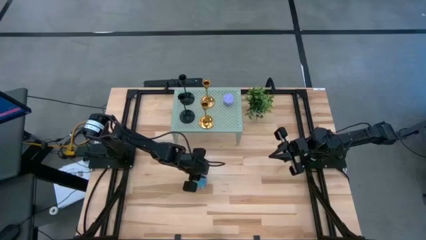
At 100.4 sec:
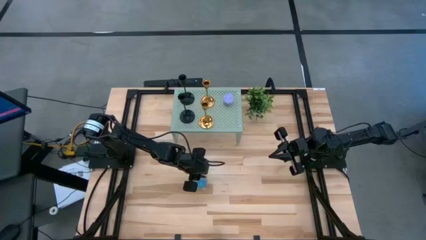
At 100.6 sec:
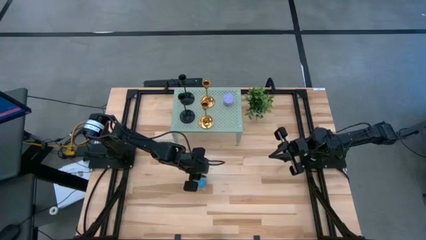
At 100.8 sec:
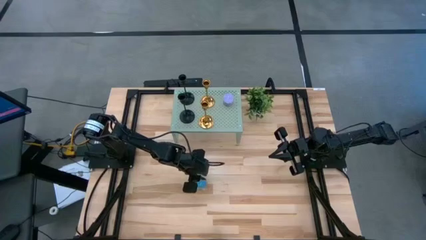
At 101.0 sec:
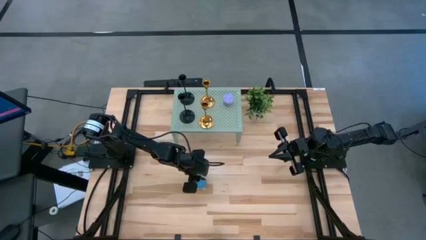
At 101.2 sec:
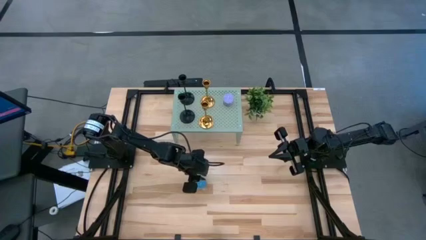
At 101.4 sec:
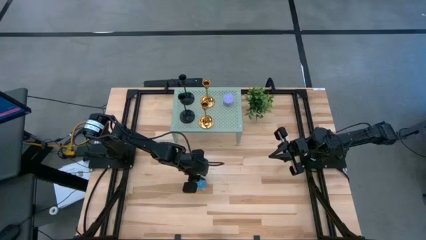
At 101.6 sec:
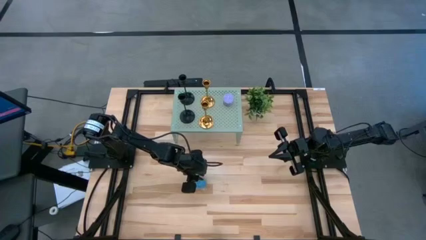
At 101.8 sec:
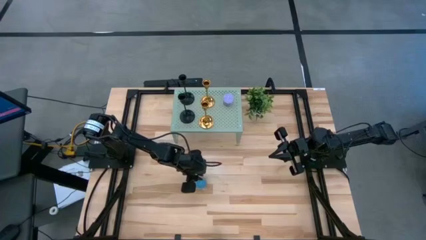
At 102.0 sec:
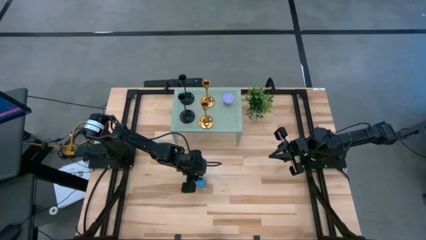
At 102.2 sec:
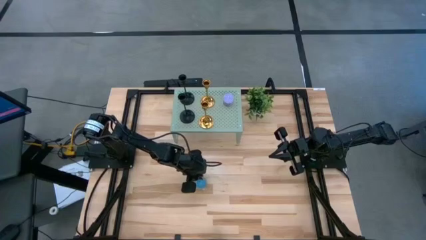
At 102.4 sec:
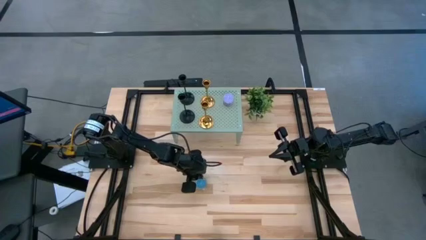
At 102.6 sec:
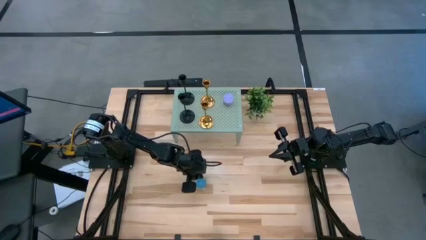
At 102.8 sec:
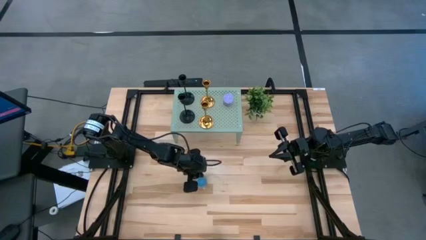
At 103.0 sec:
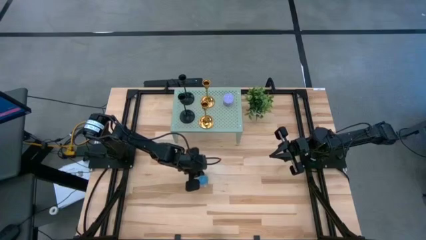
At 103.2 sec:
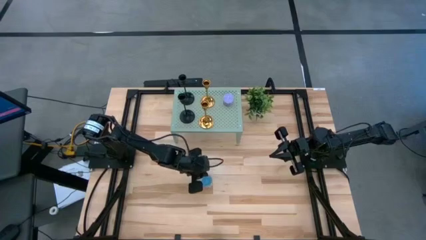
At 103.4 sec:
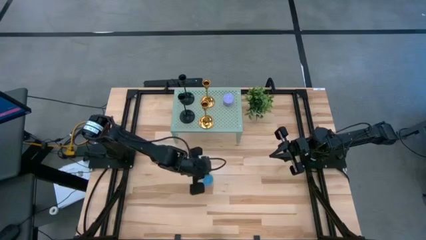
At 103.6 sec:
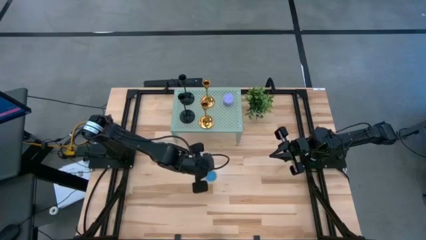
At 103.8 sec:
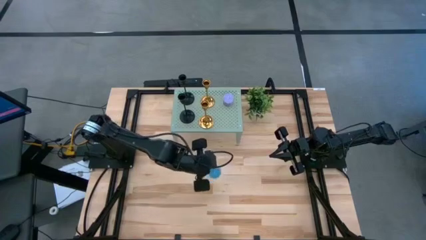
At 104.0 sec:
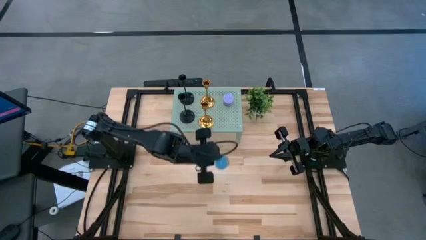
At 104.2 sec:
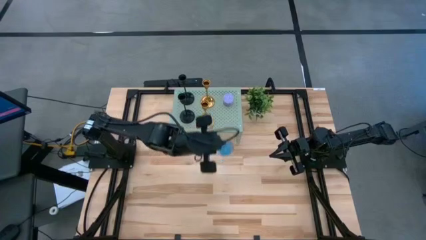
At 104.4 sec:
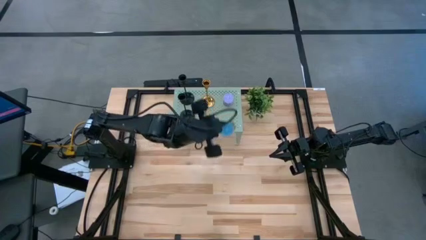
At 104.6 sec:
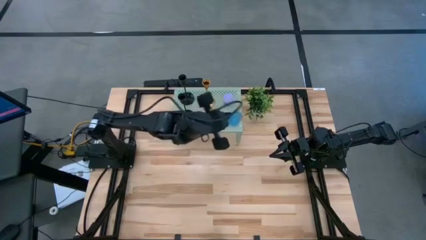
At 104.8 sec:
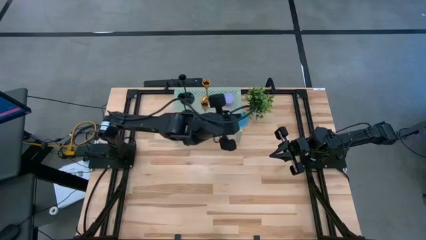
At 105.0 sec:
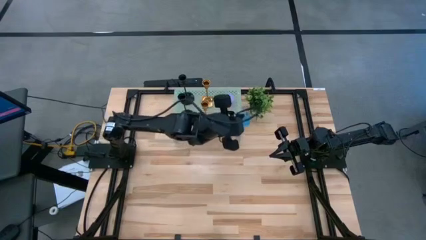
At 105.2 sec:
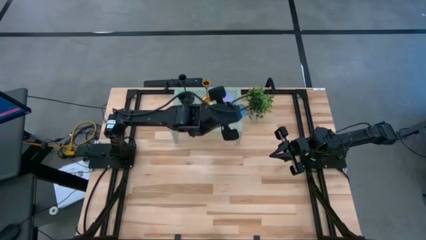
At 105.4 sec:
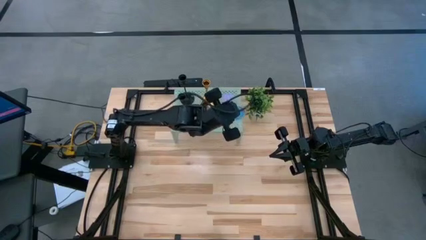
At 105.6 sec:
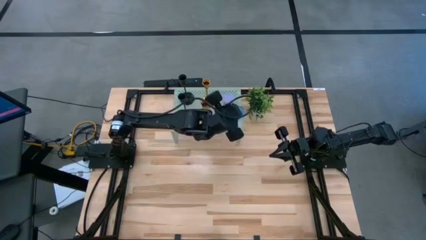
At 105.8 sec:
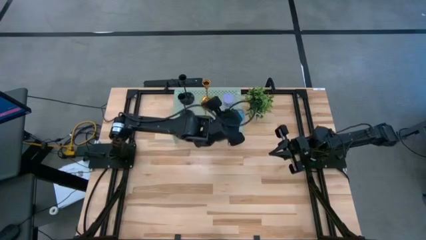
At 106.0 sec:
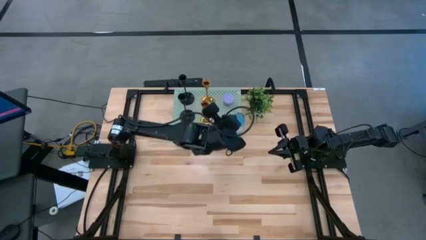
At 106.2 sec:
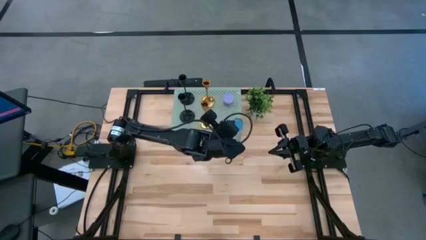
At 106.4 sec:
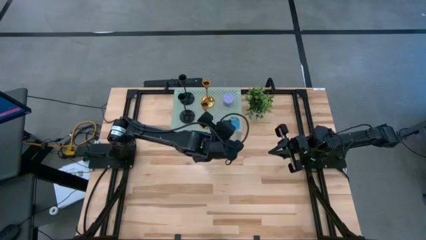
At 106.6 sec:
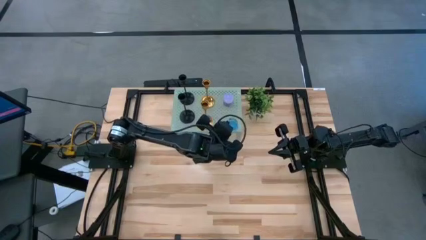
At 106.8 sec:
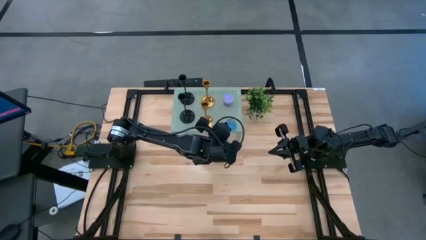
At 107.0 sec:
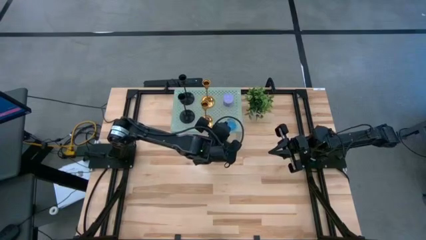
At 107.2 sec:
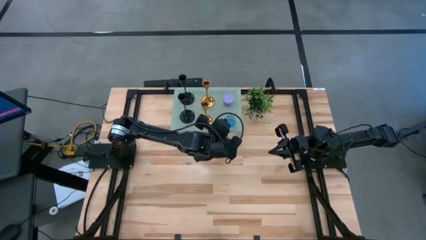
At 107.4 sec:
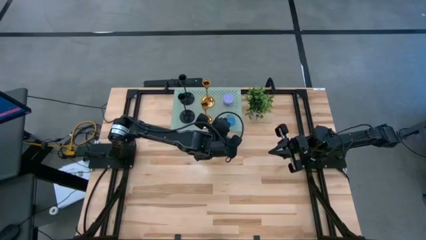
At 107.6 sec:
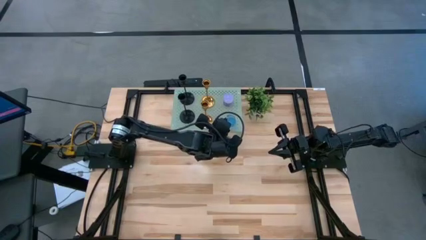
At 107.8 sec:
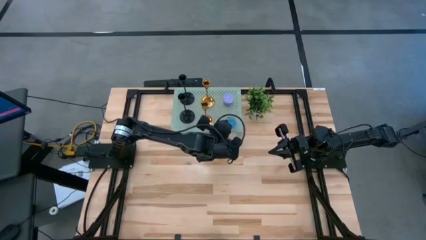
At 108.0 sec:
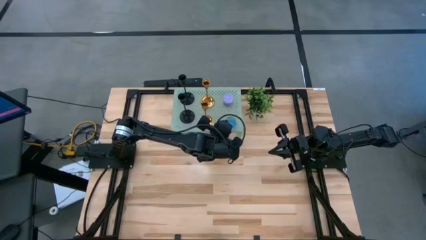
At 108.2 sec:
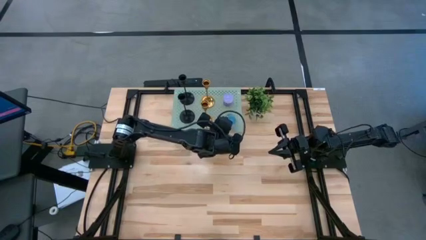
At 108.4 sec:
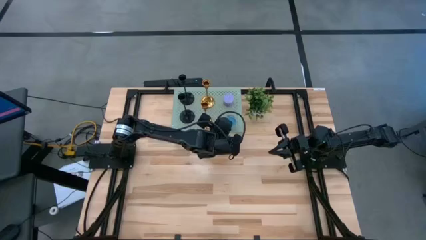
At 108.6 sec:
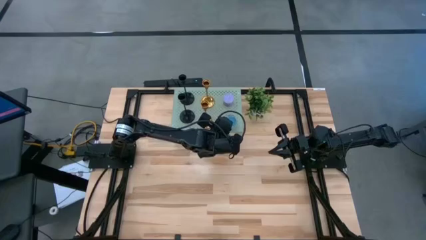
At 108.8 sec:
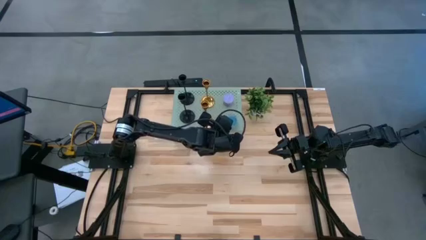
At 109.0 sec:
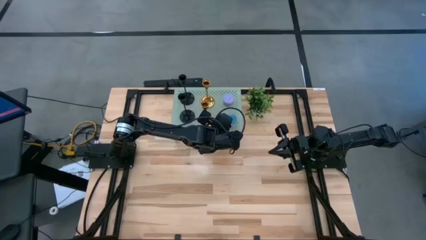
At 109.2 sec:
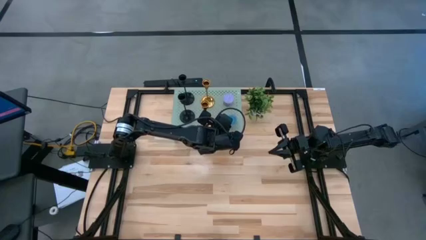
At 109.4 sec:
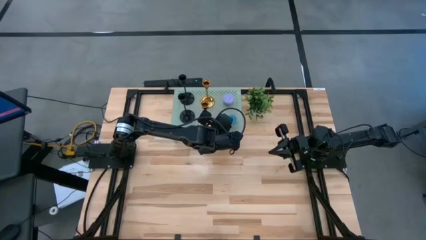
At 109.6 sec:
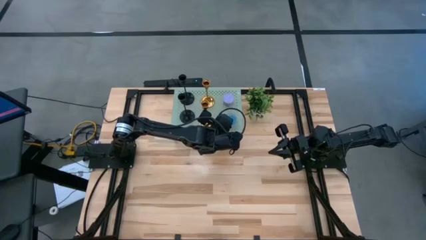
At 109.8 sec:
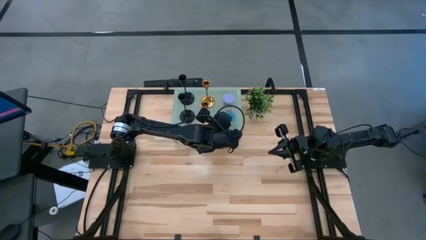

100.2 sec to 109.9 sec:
Task: Pick & Place candle stick holders
Put the blue scented candle on the shelf

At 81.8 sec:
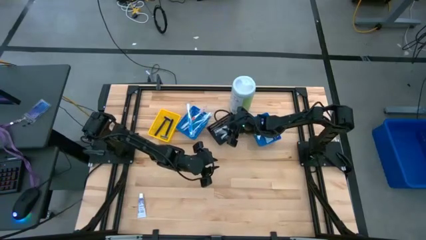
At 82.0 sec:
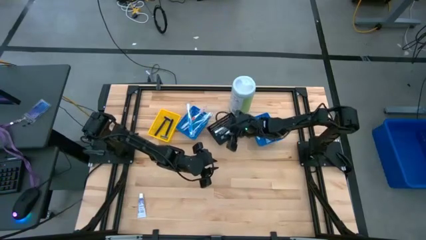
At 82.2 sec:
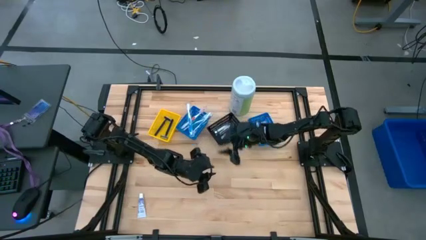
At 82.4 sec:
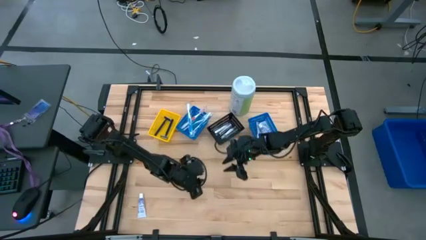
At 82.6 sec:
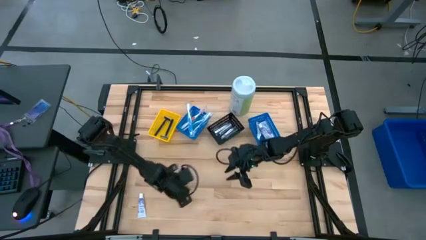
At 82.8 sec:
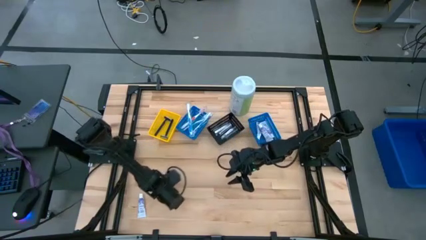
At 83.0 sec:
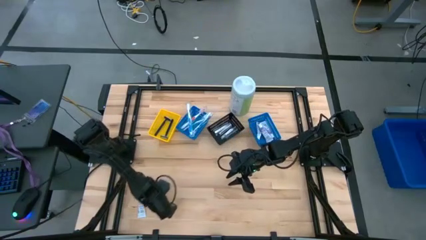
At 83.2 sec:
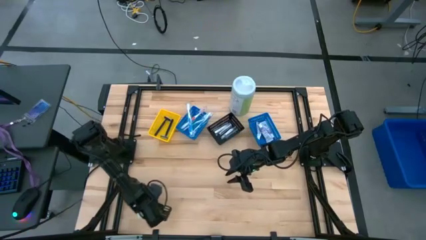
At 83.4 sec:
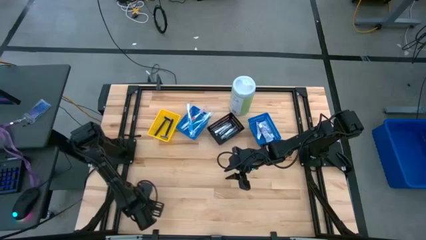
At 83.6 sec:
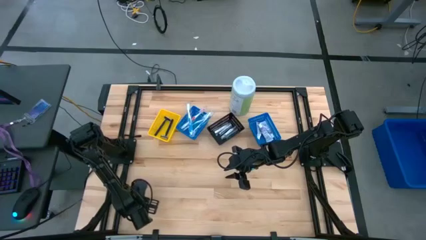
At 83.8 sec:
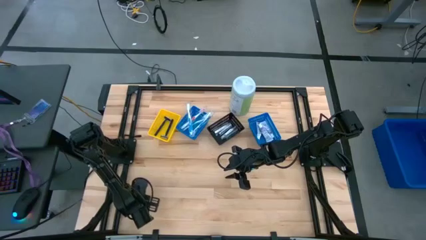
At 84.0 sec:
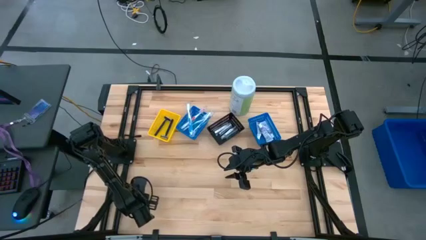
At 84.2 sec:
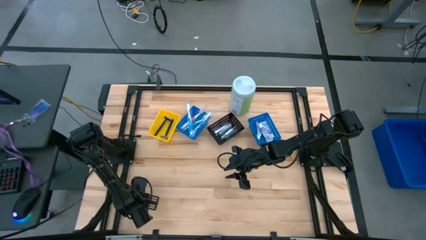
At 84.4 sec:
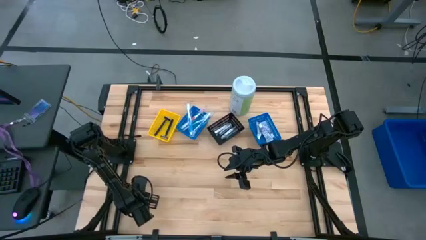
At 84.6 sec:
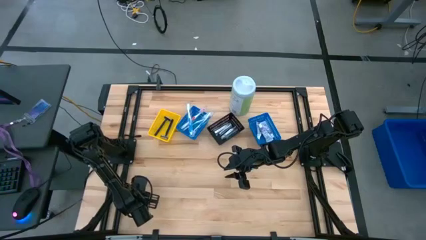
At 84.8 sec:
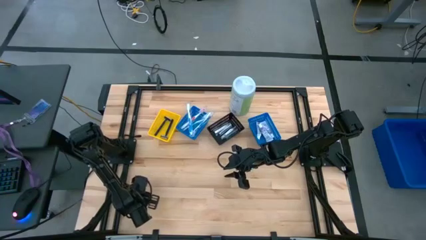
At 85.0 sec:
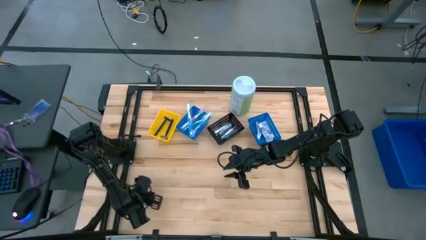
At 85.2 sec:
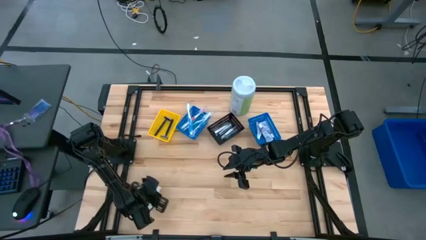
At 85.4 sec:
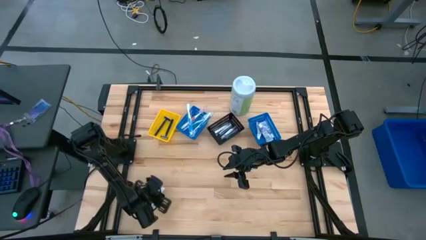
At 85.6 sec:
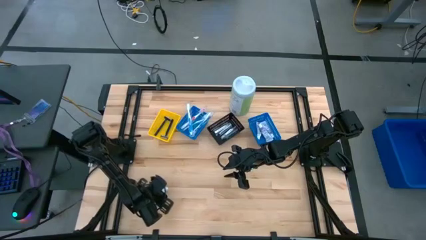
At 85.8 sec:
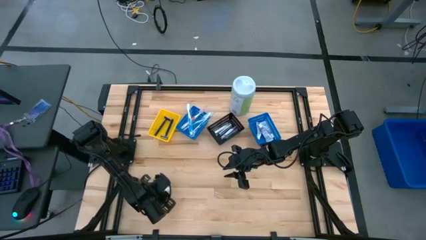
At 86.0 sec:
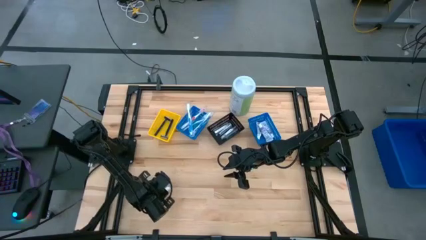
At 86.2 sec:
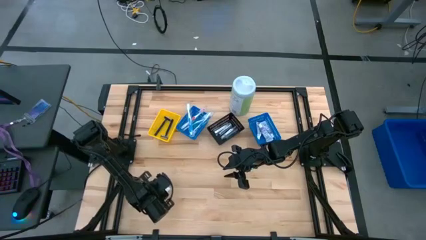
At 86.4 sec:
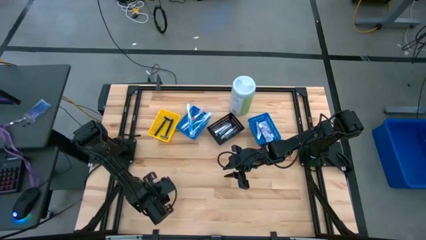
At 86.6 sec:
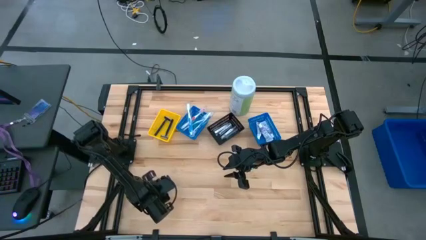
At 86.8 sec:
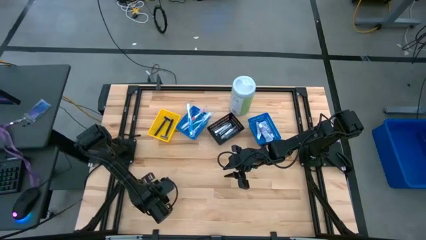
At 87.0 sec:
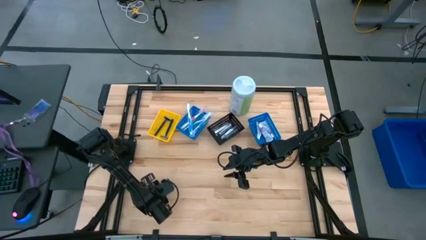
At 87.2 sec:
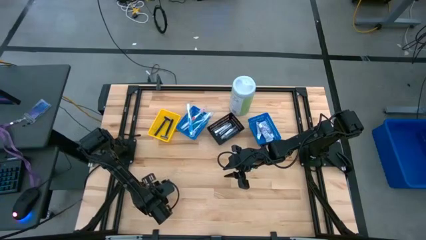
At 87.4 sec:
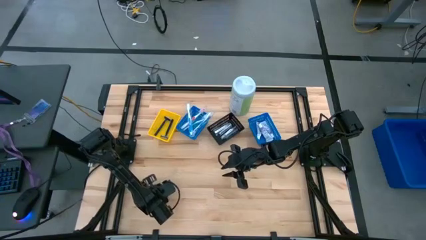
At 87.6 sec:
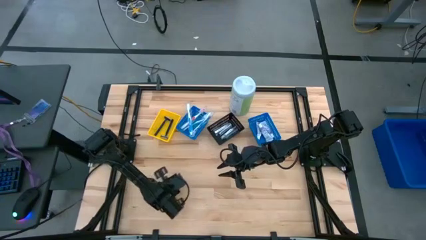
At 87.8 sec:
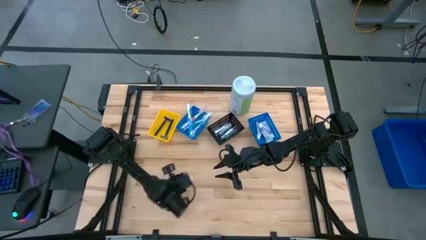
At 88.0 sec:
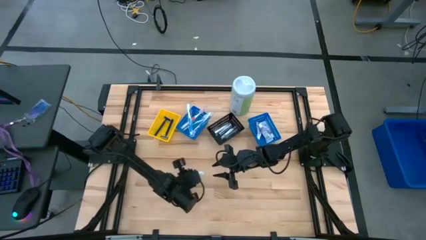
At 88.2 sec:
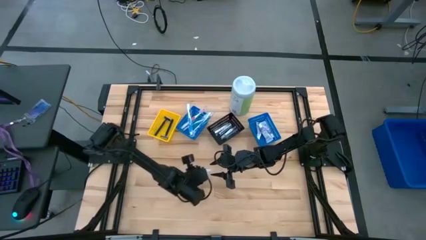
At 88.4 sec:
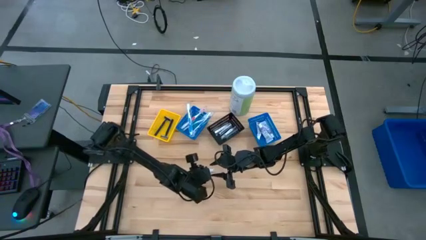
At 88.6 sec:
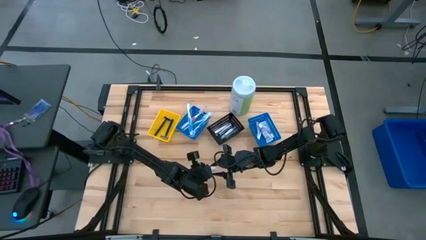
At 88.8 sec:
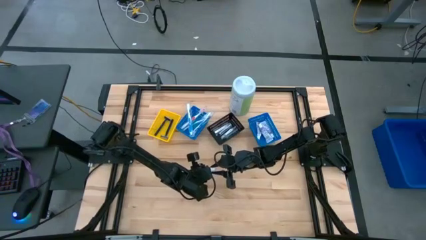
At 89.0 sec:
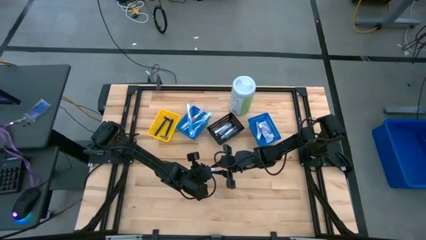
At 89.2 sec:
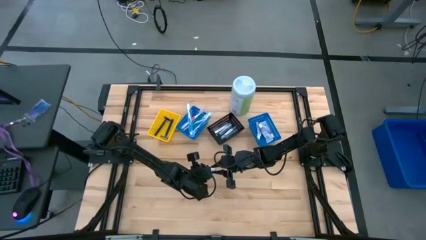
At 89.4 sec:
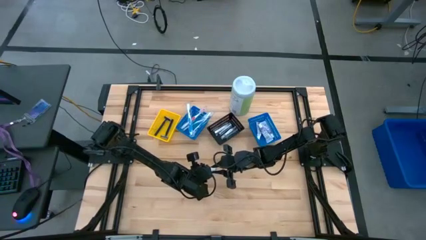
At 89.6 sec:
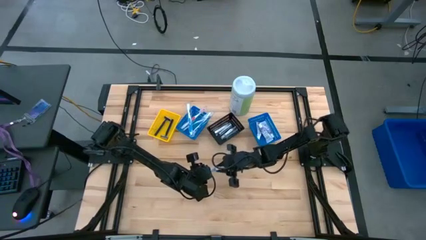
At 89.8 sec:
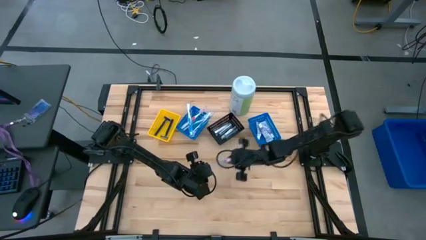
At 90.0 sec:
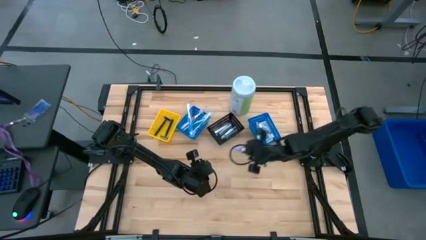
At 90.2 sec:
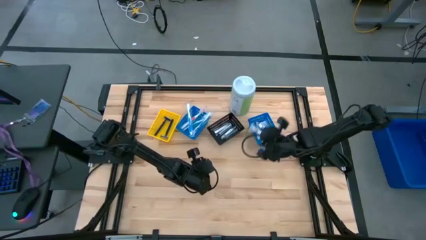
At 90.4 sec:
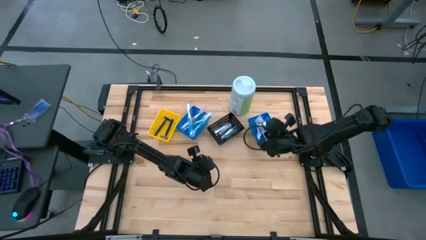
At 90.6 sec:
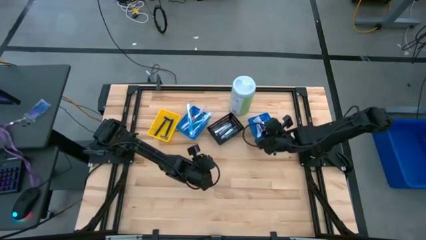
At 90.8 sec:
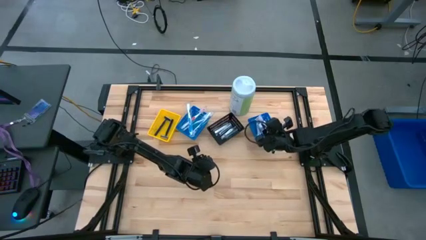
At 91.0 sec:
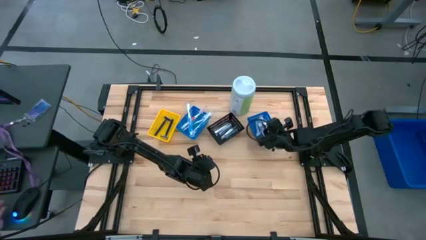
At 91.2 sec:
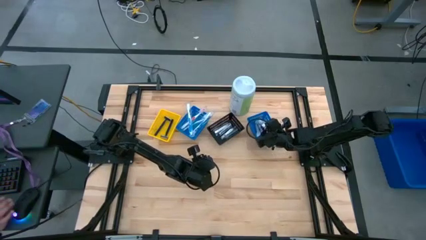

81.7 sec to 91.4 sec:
Task: Pick & Place Travel size toiletries
Put the white toothpaste into the right blue basket
